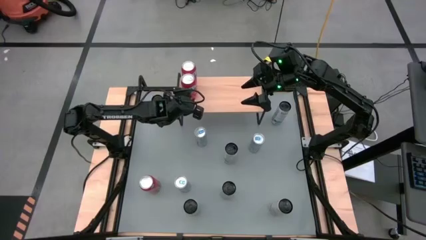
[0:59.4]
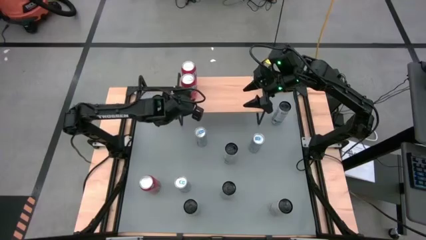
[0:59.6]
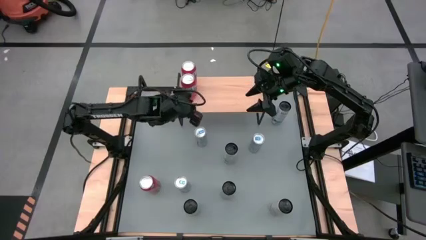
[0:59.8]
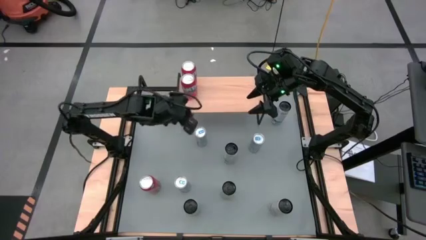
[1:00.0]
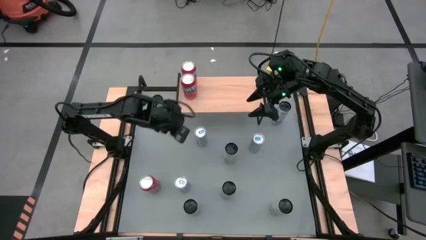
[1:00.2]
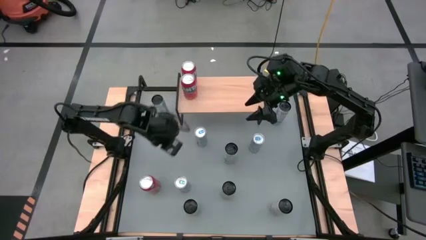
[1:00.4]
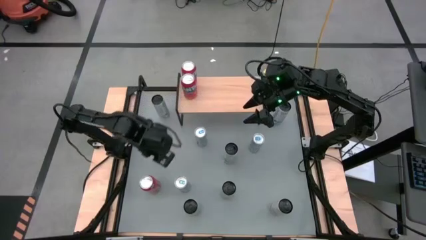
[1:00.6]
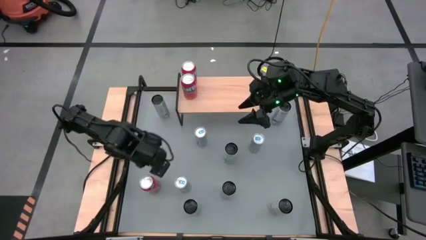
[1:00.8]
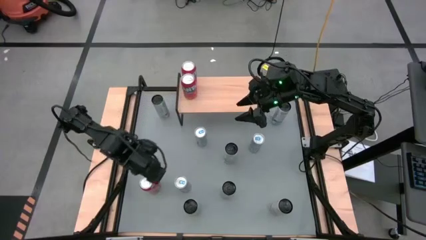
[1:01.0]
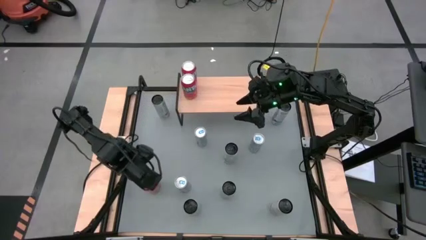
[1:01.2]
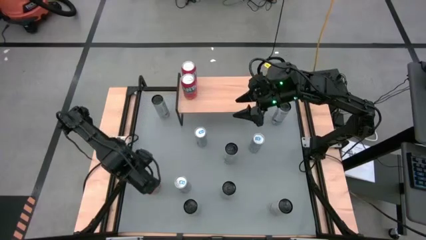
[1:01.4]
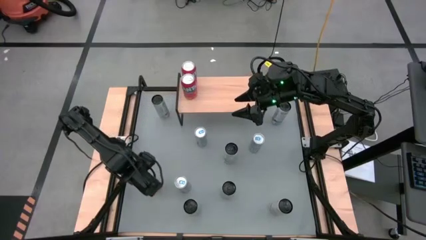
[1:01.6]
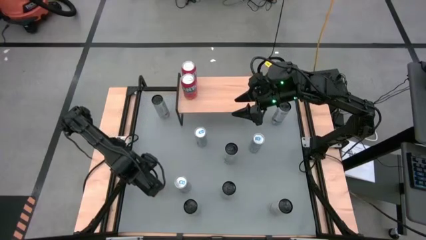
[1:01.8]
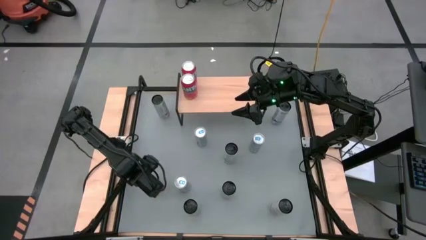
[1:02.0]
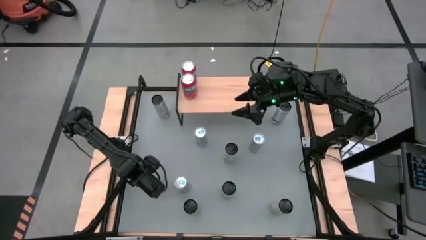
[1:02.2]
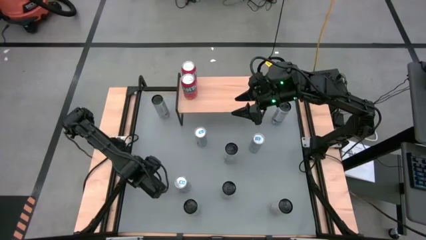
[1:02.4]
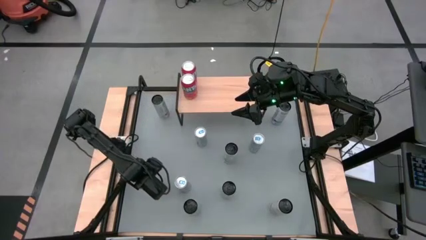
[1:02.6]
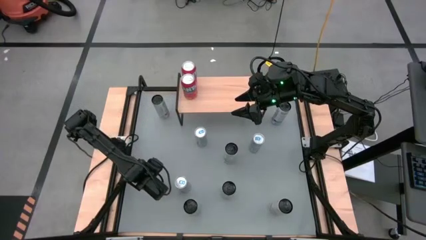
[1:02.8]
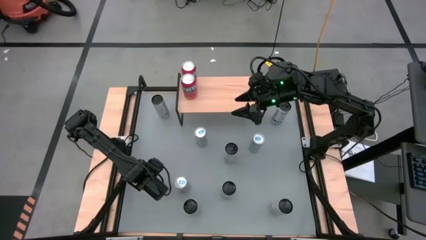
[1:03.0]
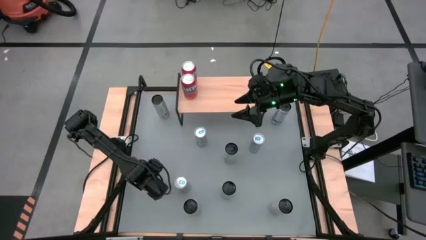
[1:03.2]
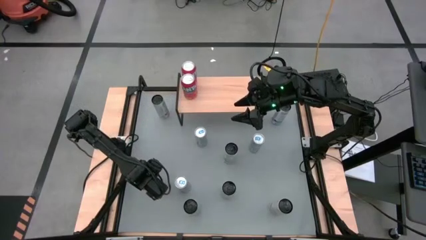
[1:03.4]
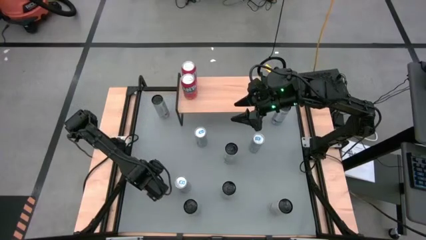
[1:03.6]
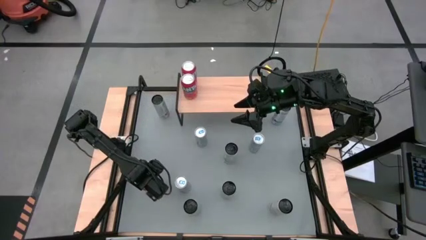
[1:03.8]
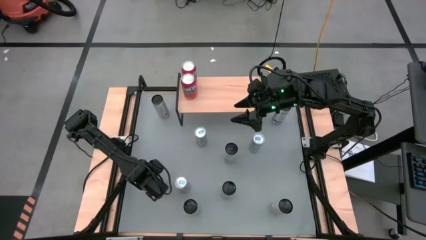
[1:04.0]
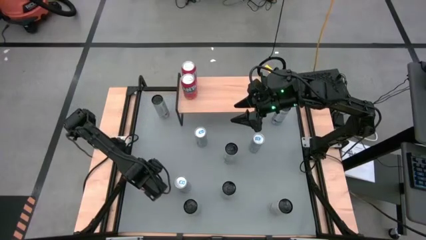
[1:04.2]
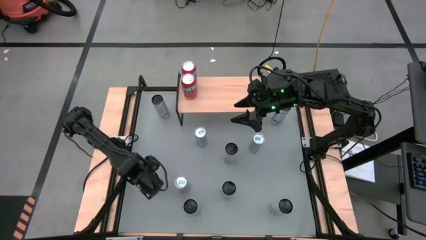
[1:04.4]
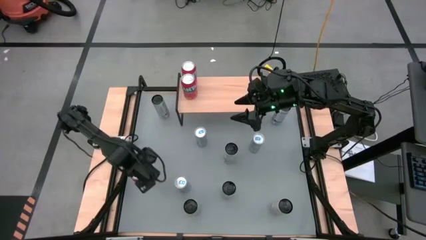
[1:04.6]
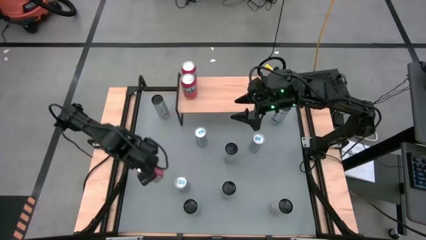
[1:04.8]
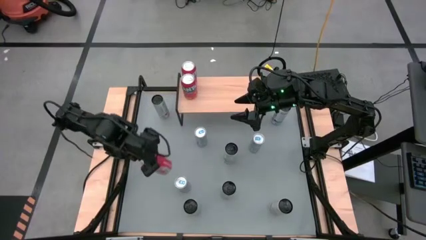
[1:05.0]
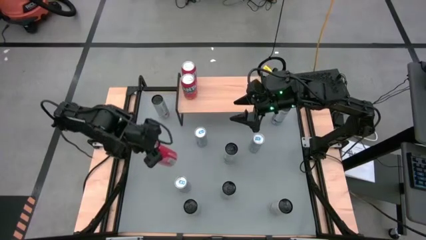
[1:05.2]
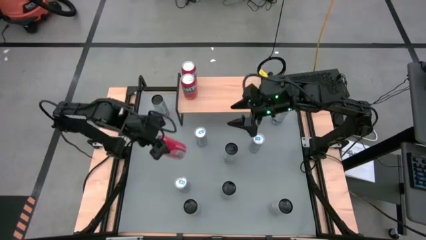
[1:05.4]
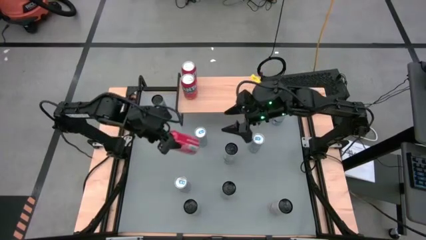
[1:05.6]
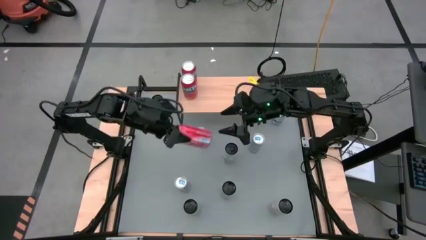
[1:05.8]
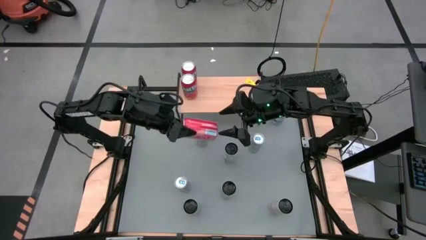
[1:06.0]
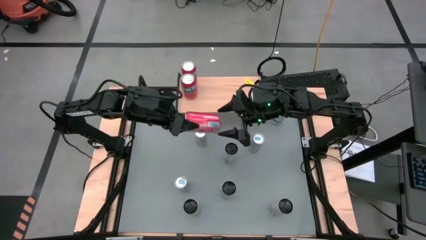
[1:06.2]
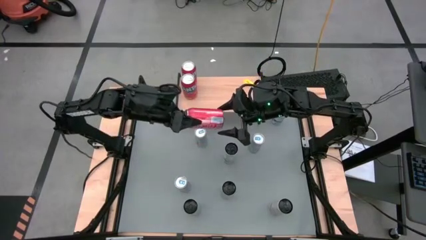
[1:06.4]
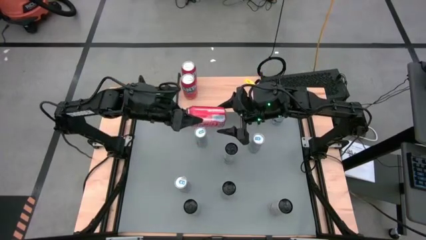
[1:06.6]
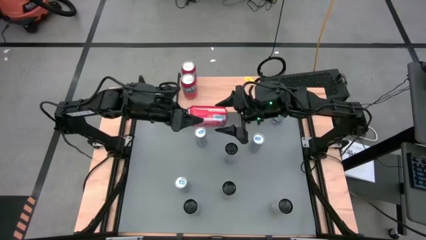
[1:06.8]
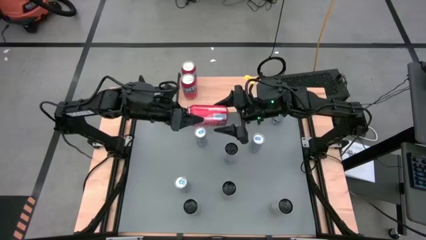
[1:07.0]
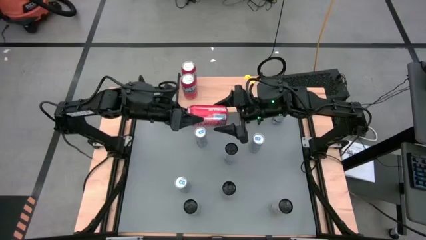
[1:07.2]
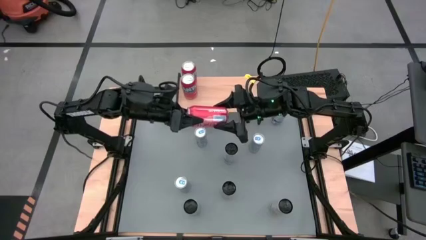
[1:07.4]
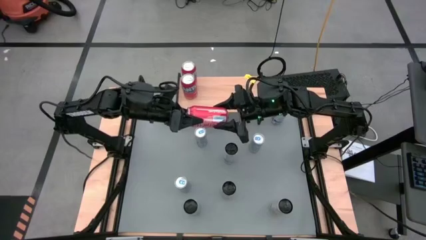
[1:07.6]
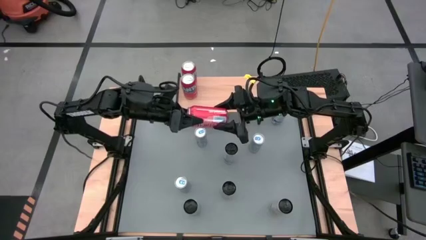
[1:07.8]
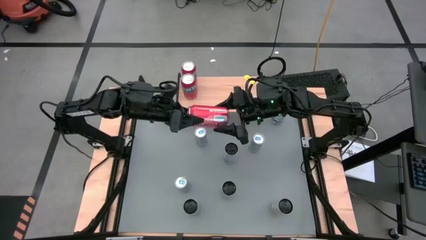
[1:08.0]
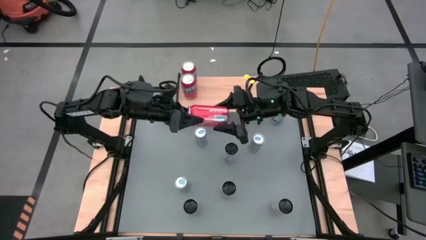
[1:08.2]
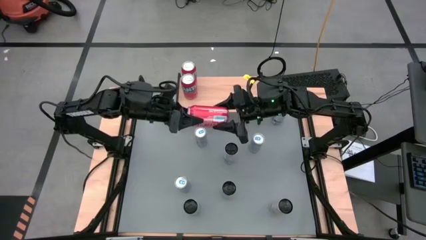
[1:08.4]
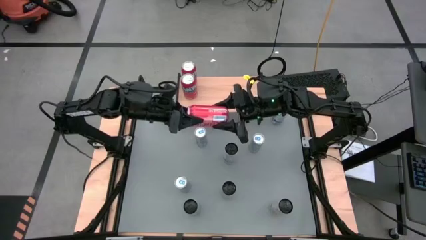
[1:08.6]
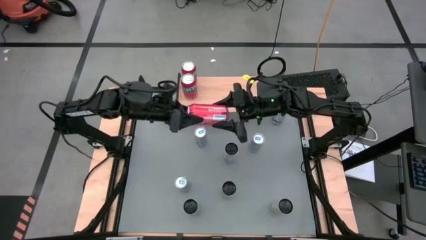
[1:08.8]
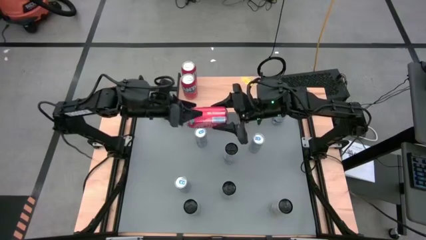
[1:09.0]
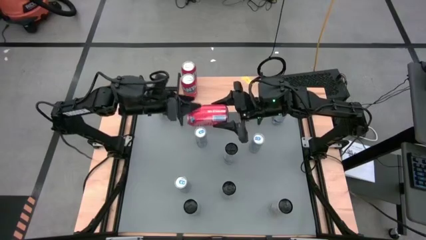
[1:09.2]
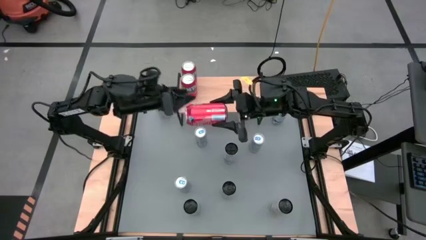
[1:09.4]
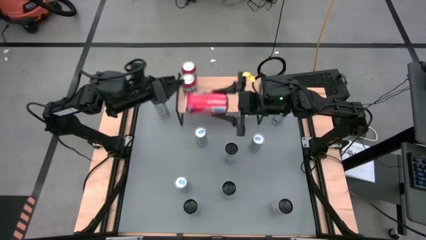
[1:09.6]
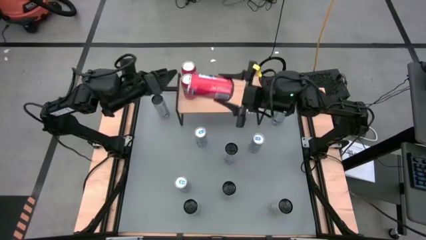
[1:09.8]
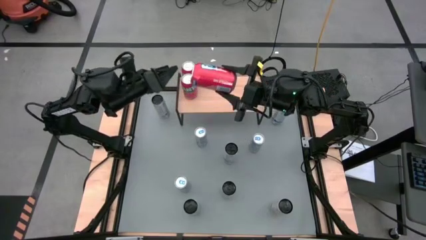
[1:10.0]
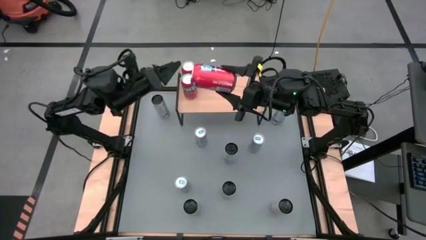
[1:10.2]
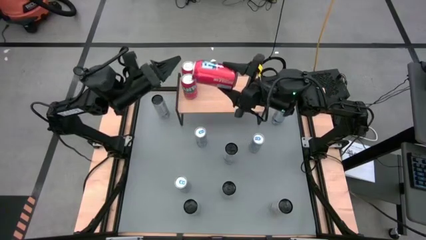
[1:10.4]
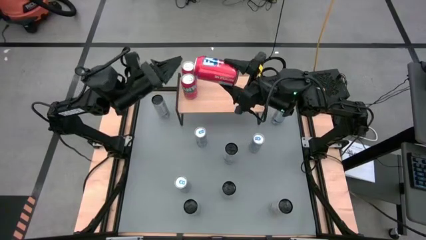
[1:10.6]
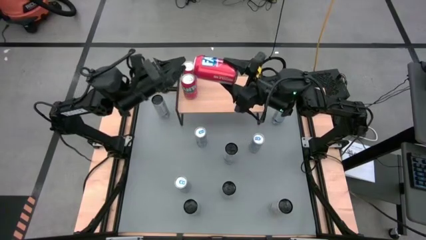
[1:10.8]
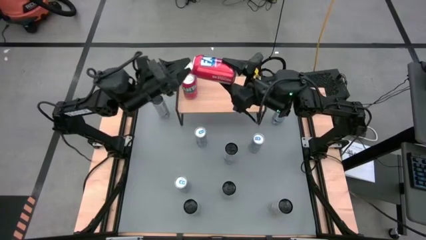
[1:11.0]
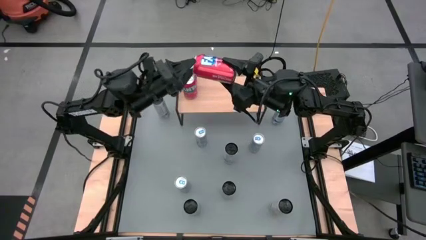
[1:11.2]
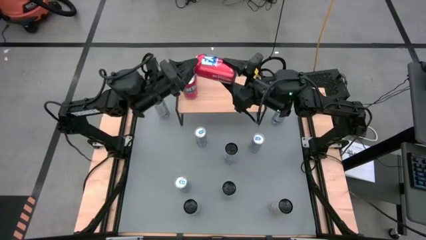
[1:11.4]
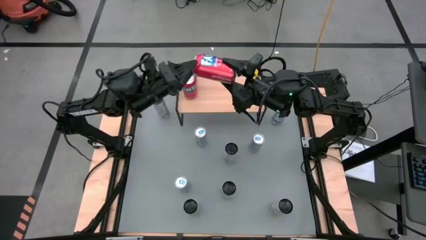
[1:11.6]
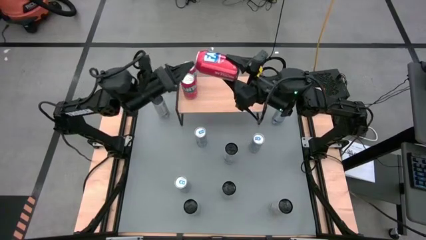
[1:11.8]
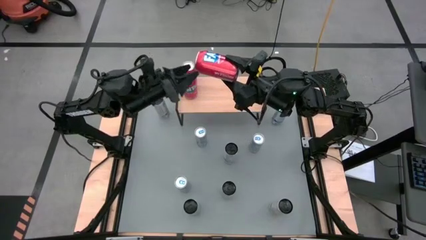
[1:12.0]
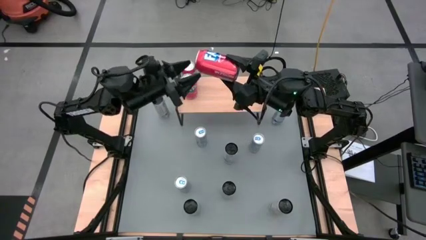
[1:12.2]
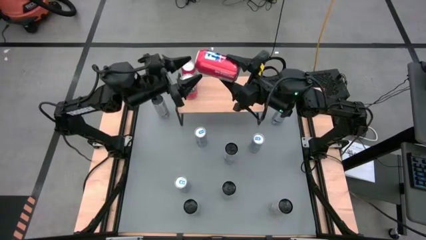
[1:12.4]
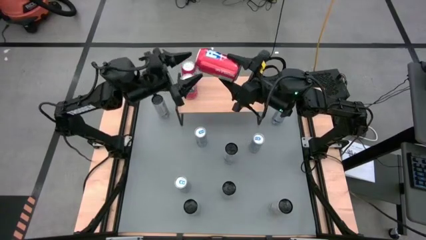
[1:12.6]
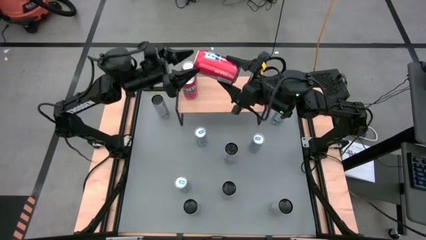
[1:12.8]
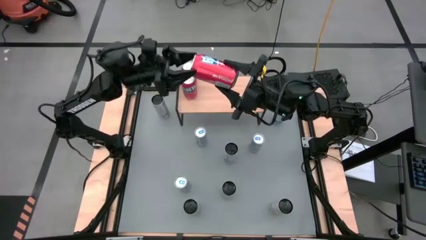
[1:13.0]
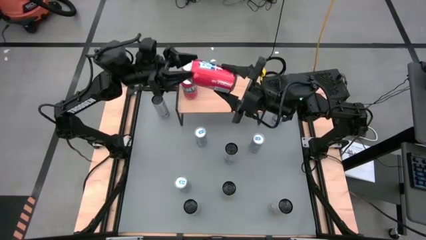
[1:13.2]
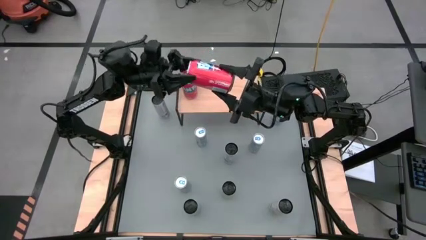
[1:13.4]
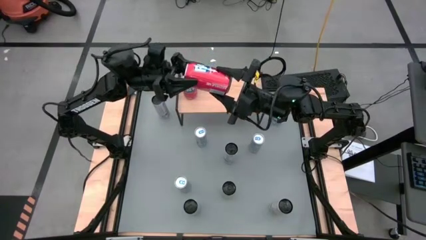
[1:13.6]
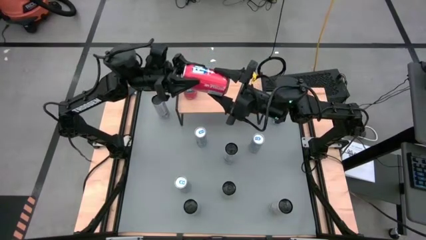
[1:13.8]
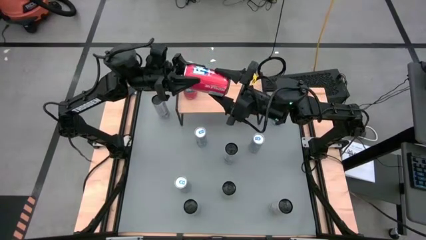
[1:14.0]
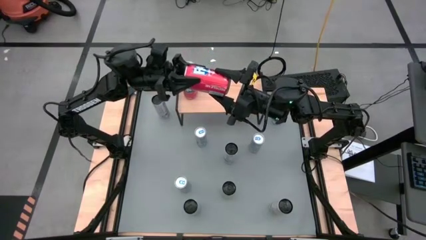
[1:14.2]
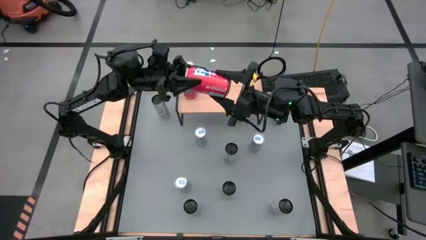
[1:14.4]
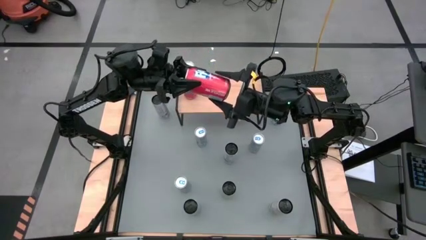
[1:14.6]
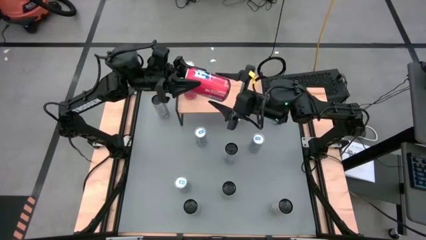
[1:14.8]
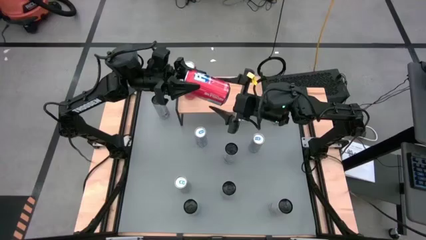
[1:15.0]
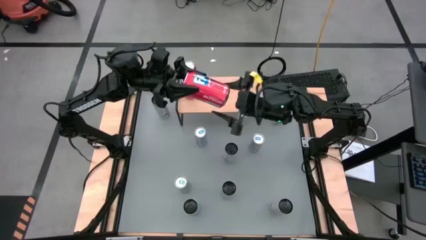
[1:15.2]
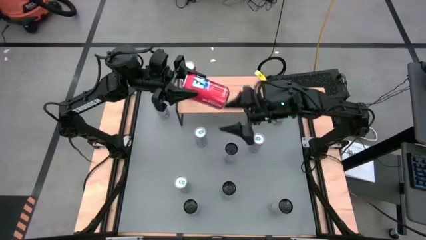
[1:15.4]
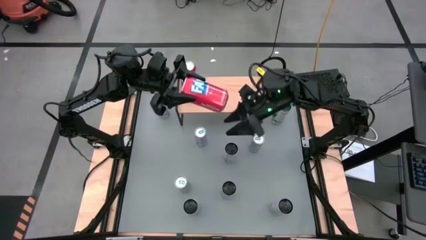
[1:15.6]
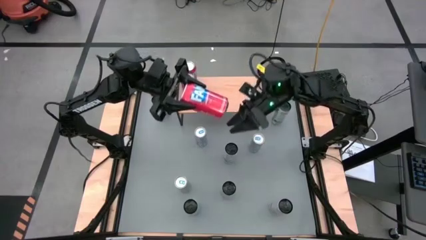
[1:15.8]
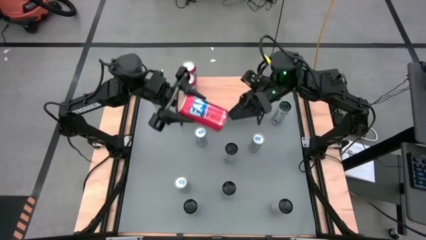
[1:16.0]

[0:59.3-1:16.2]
Task: Place canned beverage on shelf
Put the red soda can on the shelf aligned with the other red soda cans

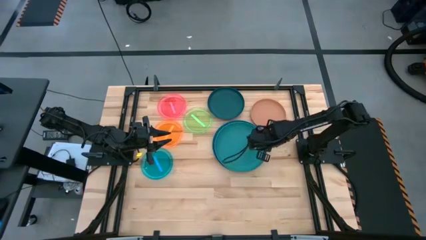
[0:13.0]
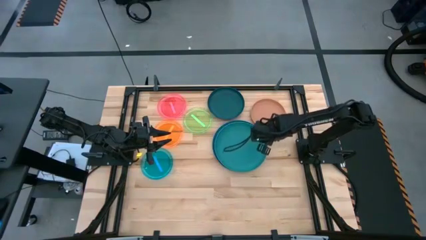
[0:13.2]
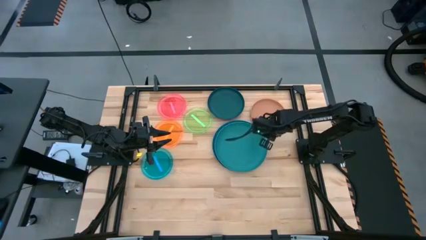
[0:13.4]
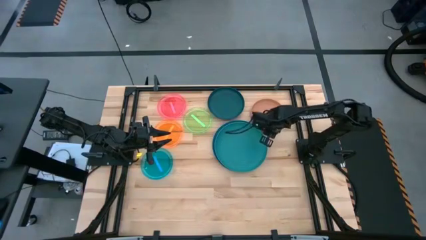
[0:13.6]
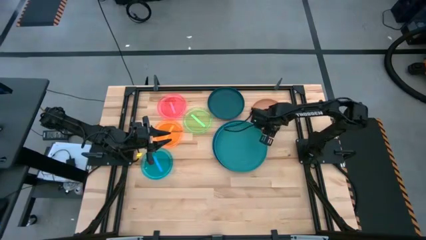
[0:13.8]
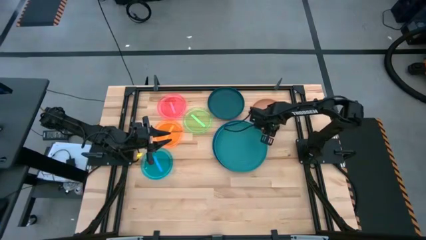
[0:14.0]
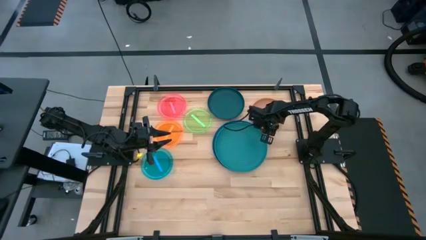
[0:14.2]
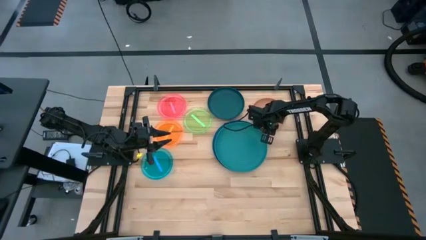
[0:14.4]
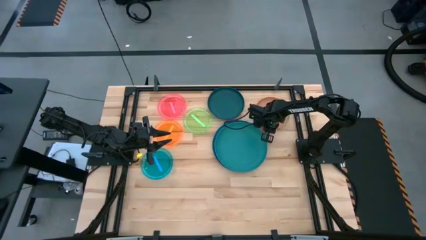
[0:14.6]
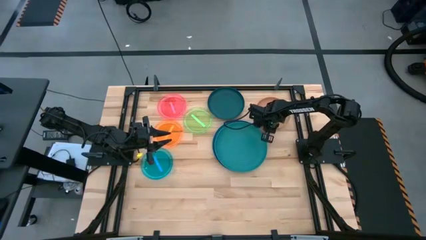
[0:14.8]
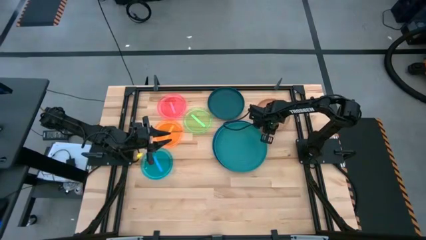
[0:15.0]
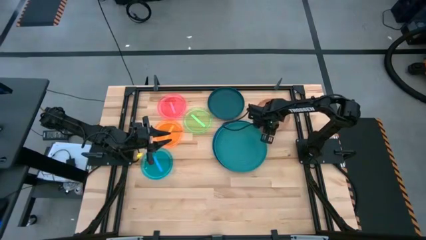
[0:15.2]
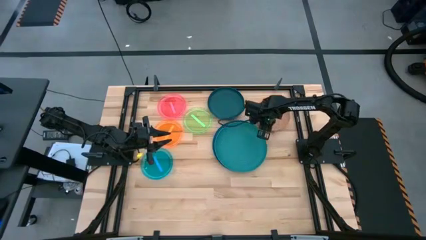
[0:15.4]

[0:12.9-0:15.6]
Task: Stack plastic plates
Stack the dark blue plate on top of the green plate
